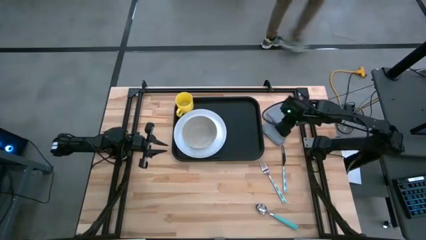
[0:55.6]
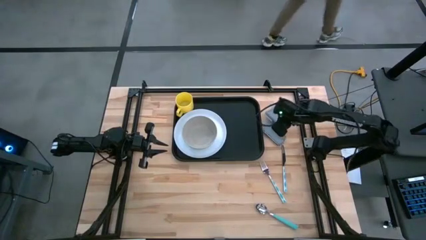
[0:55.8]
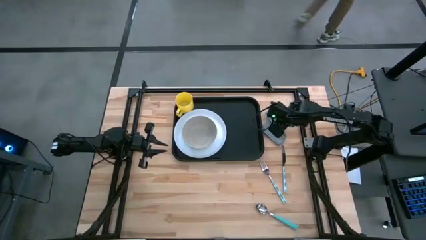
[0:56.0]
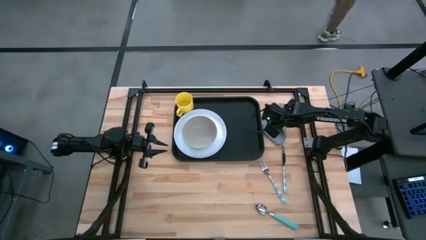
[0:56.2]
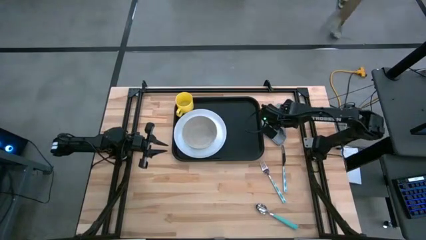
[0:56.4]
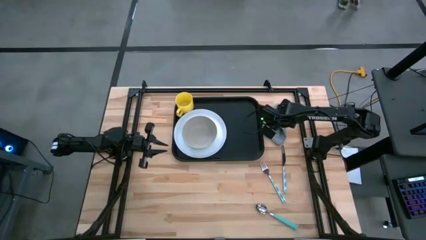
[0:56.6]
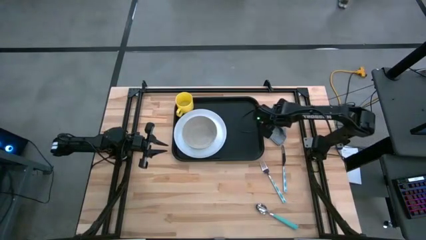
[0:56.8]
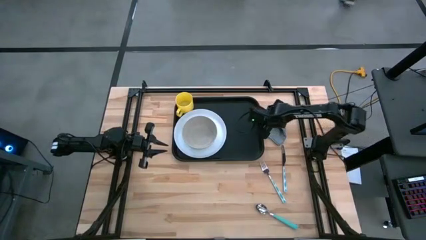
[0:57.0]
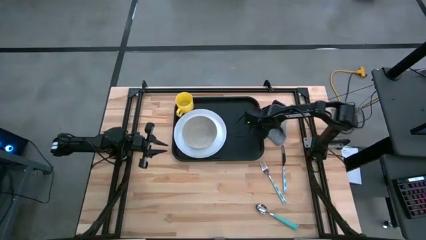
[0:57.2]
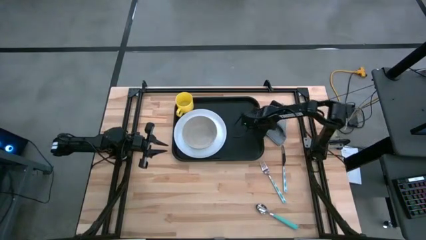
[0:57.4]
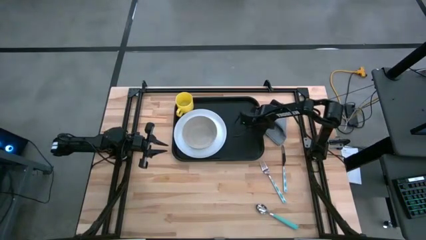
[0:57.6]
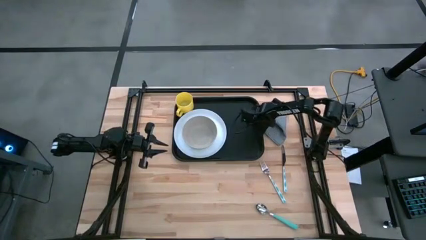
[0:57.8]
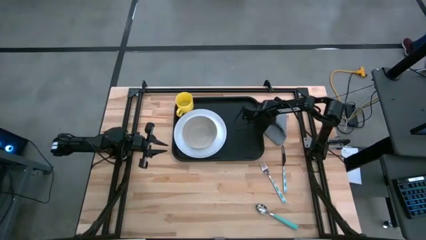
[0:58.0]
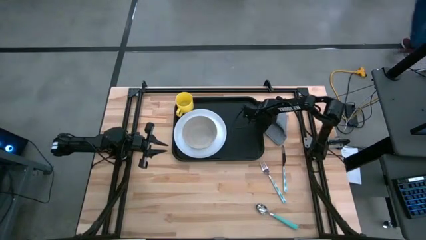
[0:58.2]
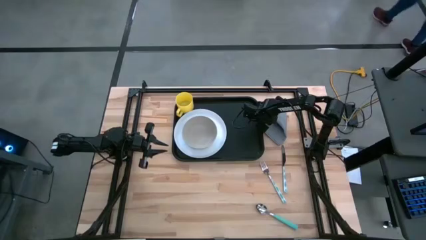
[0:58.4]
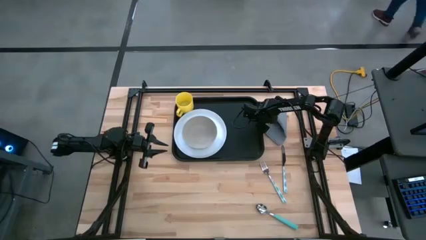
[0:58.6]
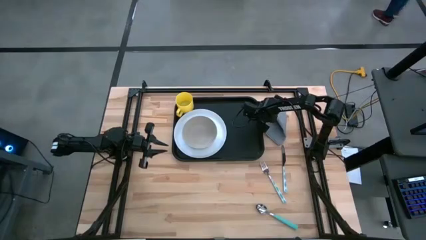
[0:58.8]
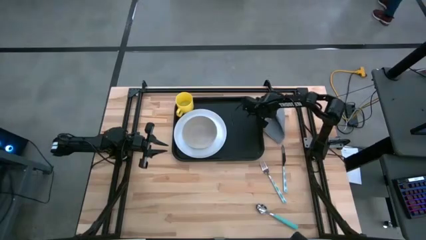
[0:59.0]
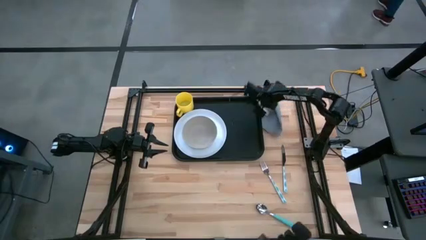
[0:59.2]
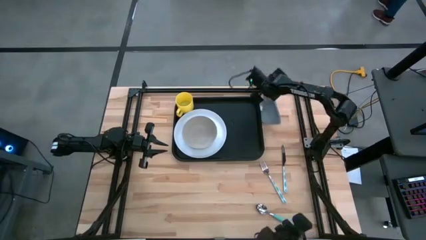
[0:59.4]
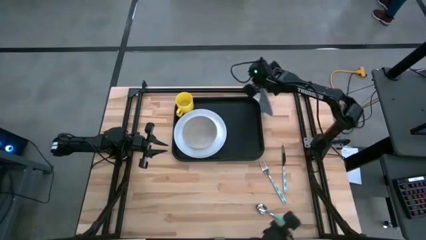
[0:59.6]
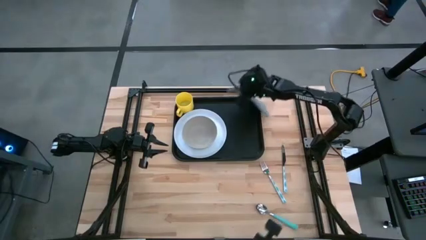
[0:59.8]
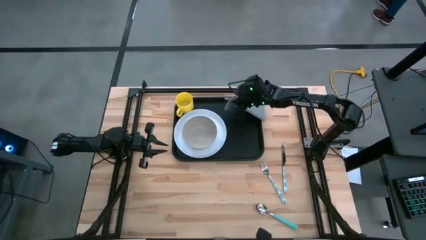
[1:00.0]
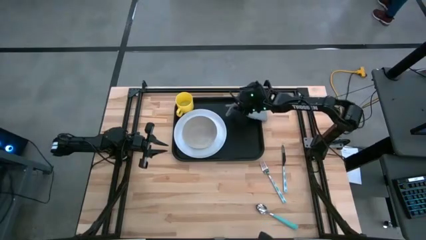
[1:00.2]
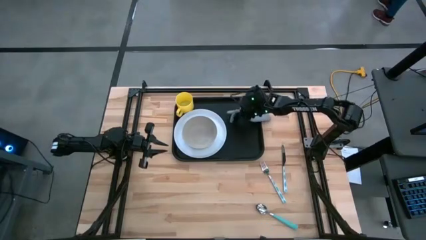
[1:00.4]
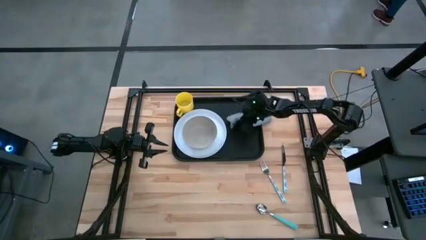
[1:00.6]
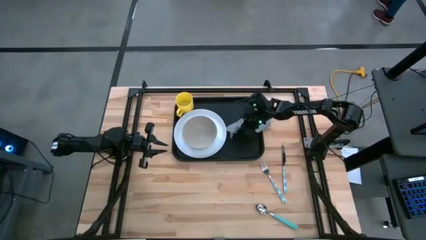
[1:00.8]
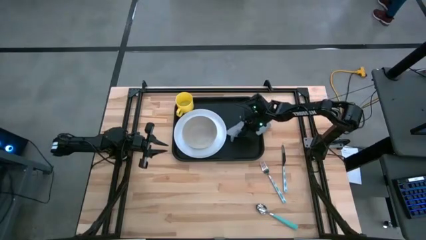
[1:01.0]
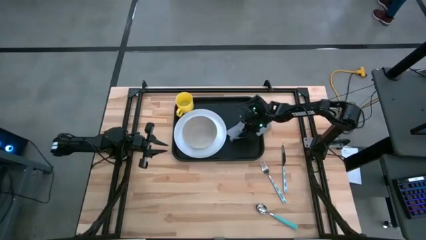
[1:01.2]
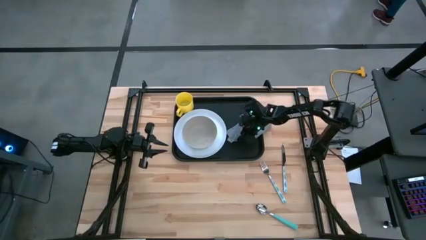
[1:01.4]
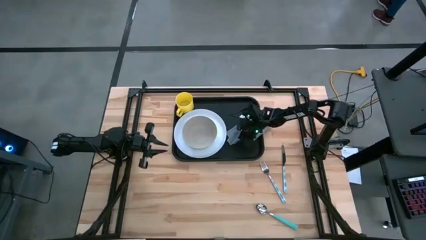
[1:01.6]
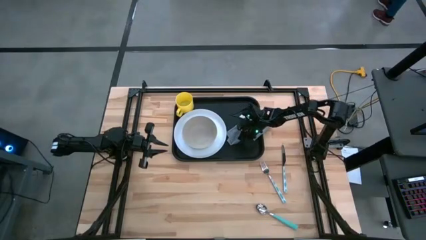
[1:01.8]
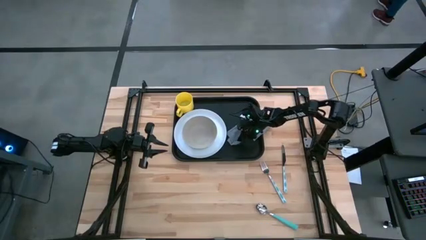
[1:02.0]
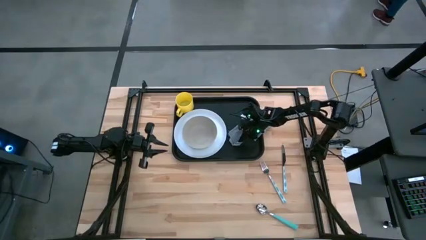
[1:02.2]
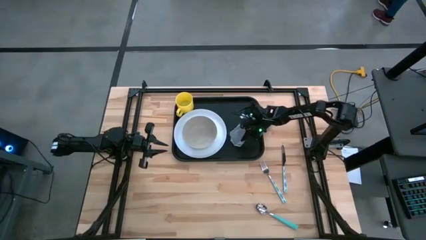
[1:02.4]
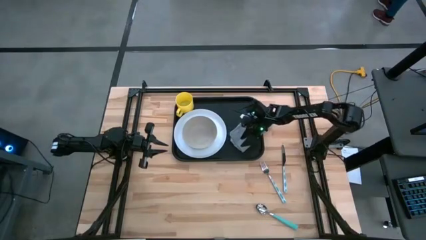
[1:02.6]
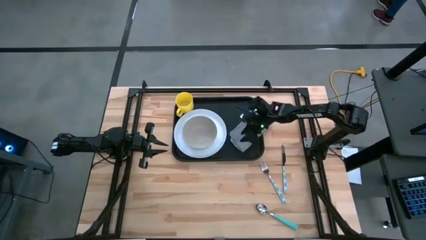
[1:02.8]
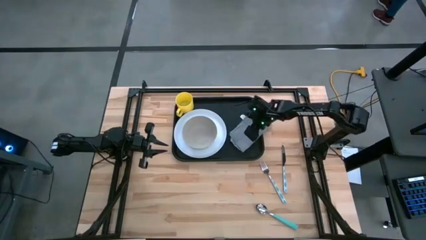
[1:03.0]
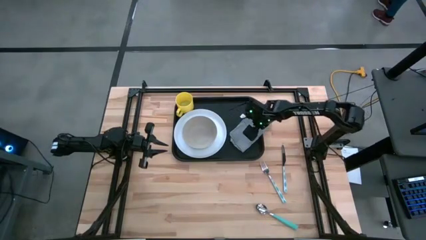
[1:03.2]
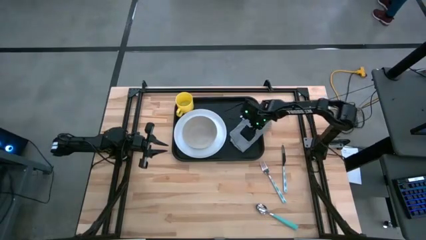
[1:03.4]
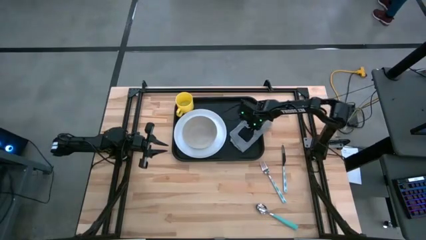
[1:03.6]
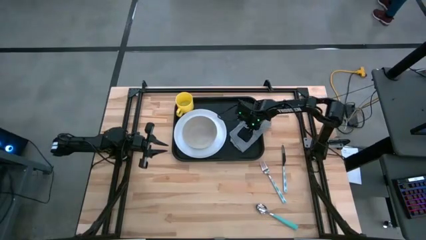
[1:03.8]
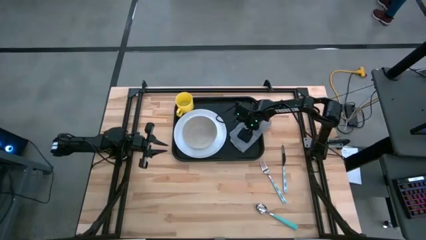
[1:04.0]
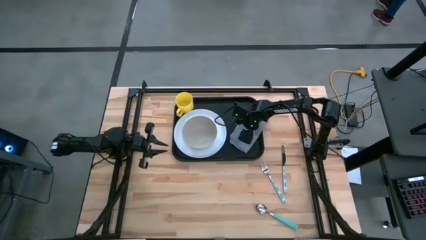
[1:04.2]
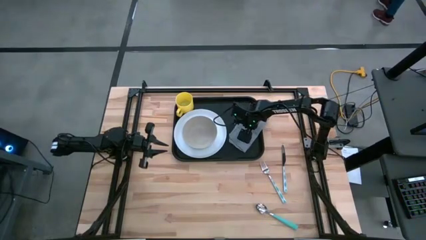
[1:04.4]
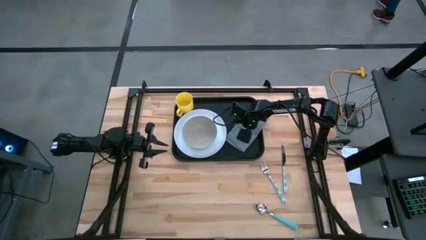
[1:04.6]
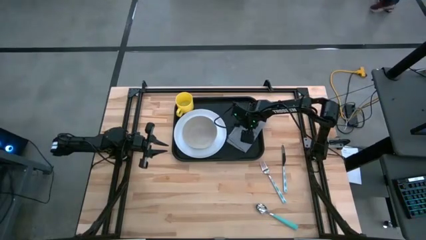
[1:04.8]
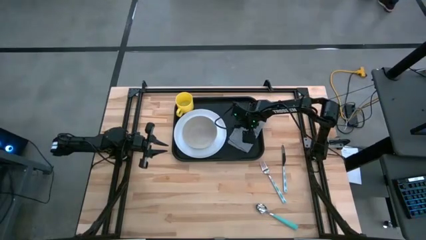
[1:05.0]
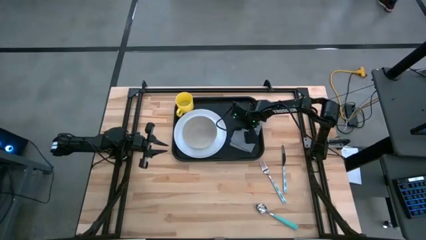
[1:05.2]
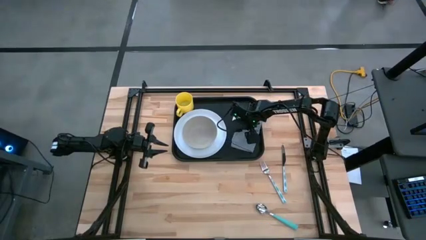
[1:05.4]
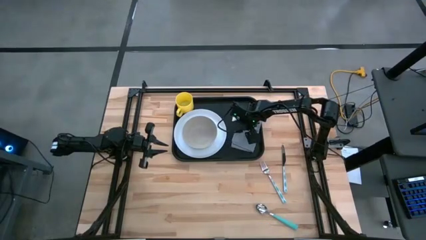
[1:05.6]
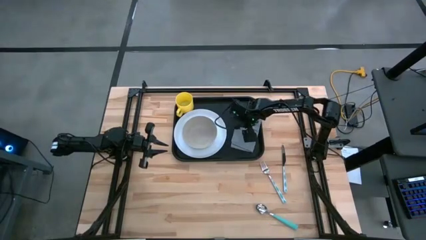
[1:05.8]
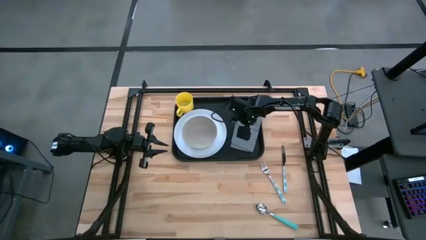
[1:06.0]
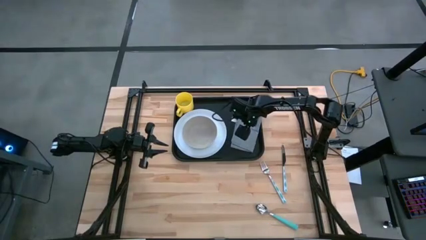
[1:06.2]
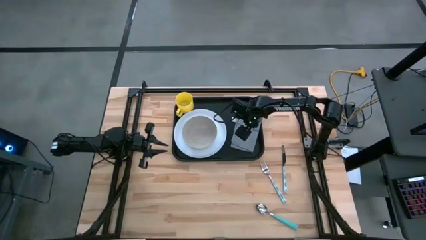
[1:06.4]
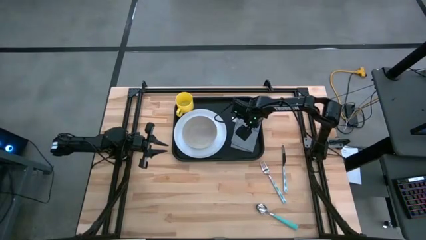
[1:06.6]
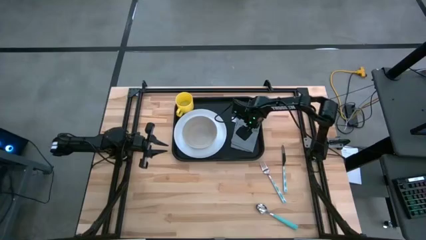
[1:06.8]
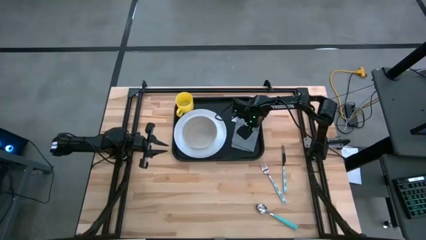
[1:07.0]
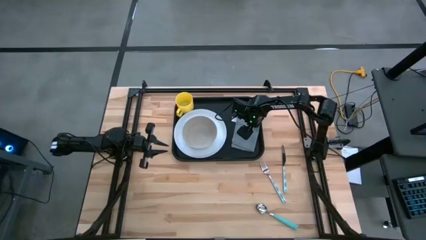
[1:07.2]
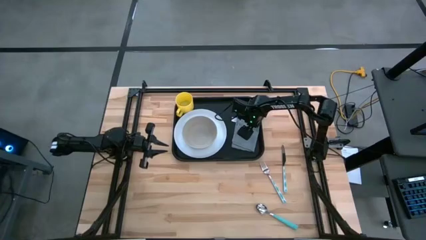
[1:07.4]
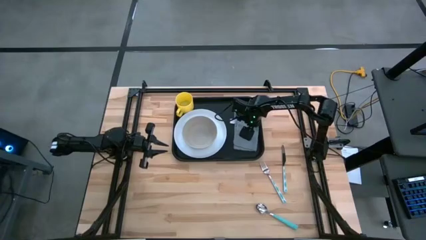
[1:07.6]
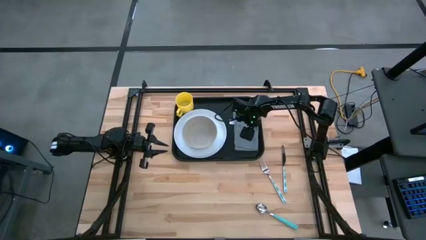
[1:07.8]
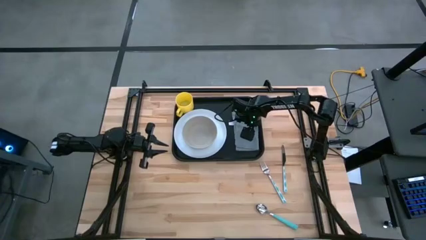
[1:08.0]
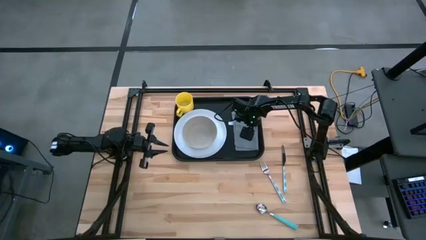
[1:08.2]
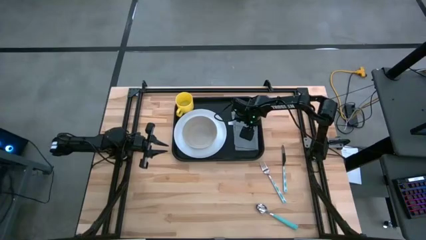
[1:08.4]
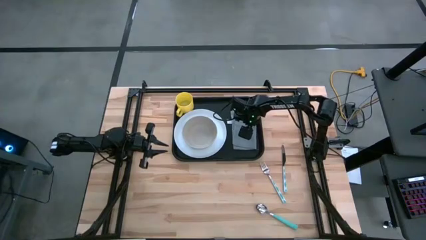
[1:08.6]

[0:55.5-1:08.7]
Task: Set up tray
Put the gray napkin on the black serving tray to the right of the white plate

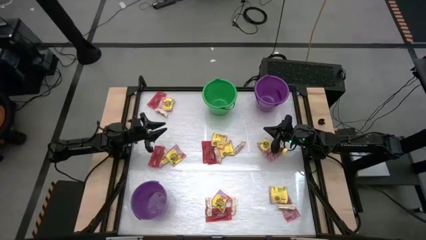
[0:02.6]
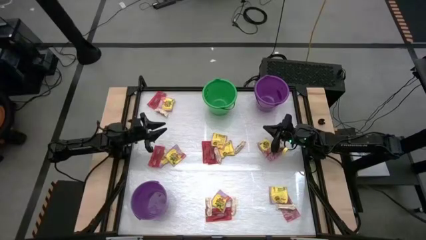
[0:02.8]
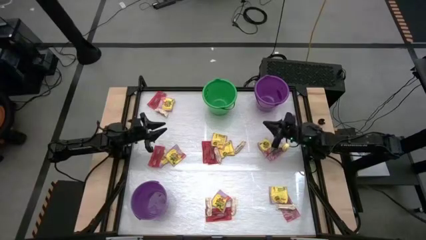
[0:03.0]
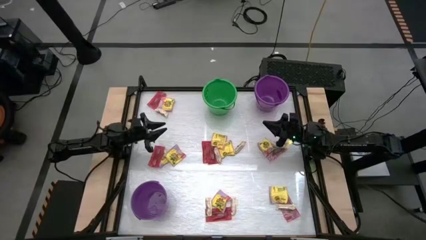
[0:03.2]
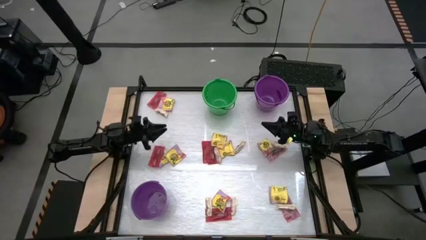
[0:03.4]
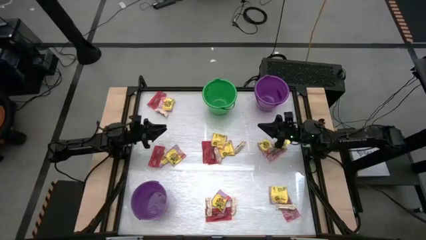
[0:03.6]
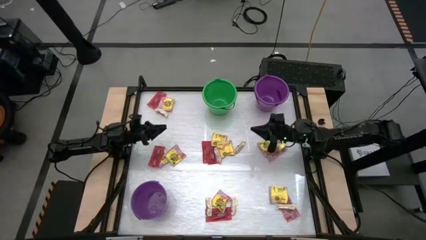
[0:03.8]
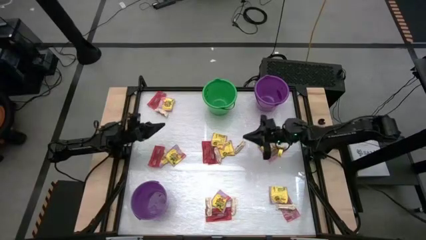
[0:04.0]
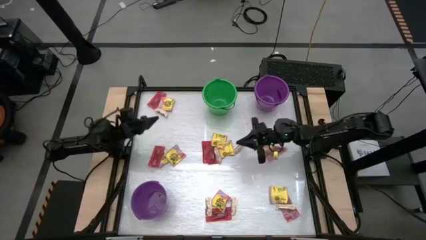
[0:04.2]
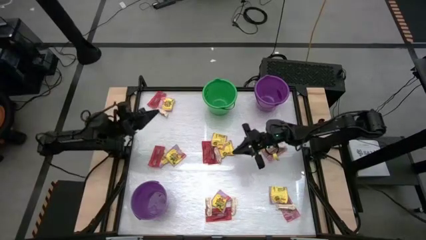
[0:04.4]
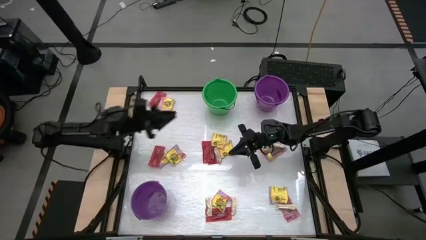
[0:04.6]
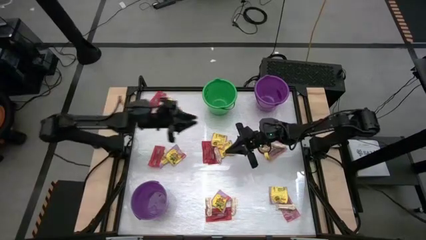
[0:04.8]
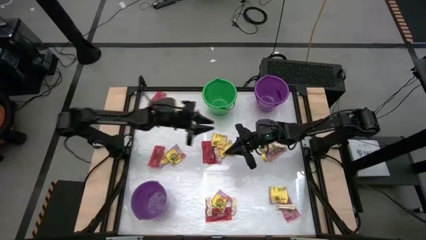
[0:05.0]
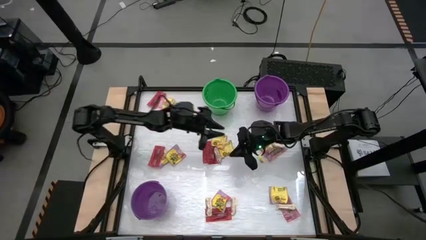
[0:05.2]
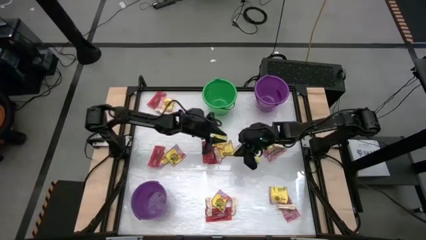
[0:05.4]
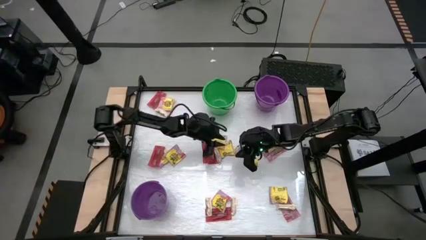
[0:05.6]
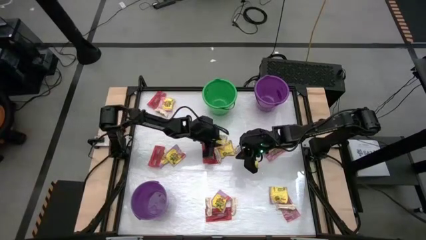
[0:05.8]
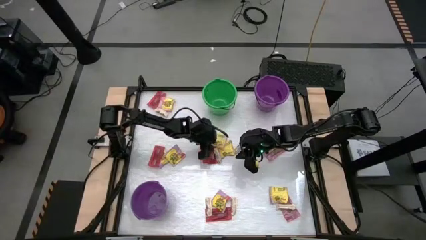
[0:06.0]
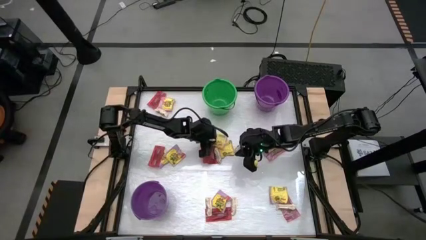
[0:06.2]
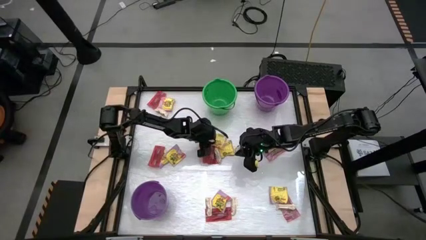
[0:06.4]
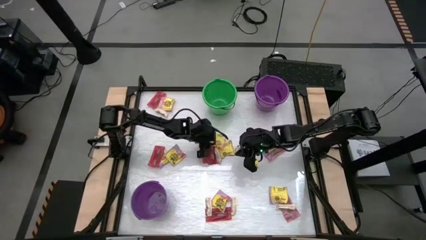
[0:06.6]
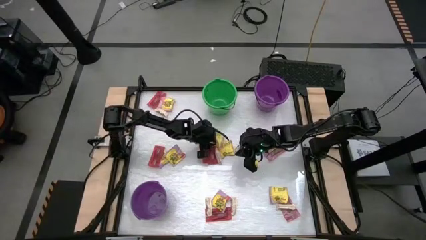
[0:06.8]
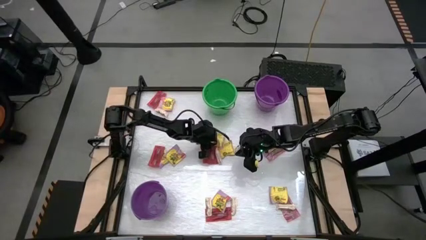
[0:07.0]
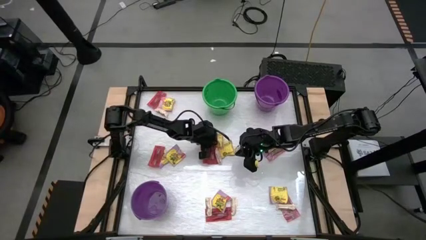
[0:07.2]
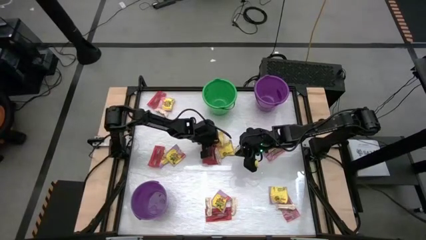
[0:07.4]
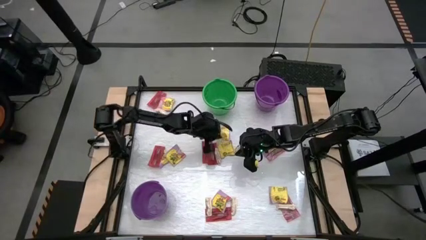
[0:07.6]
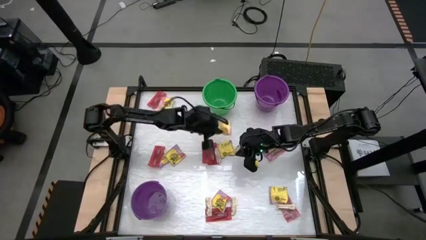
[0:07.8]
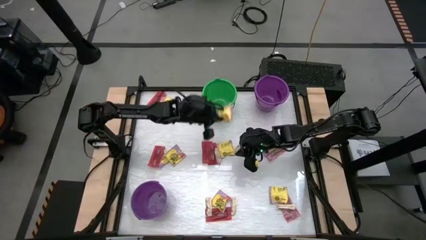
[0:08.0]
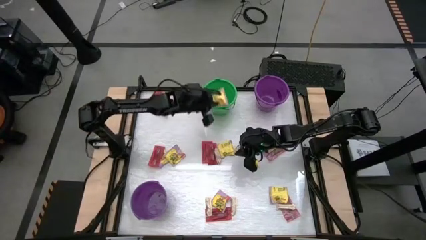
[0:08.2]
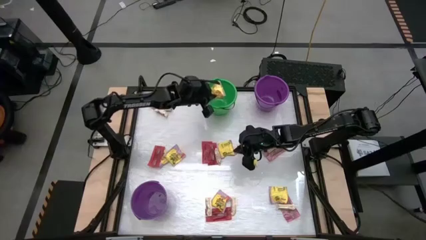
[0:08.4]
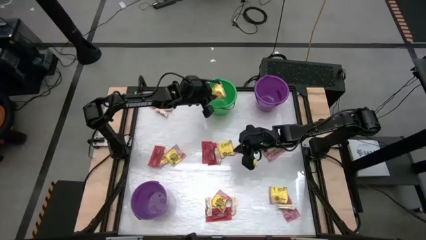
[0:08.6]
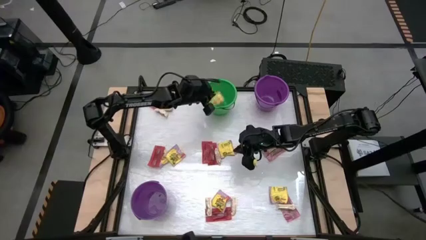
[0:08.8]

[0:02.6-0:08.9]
Task: Sort candy by brand, put in halloween buckets
Put the yellow candy into the green bucket
